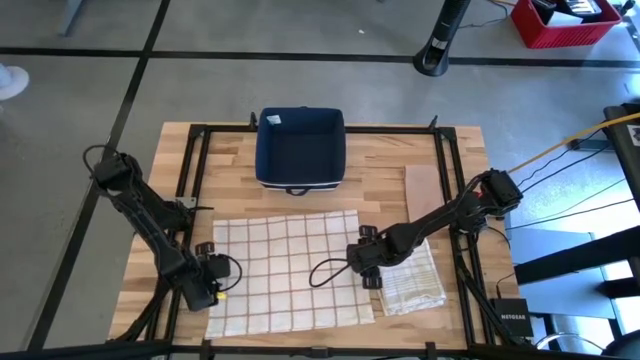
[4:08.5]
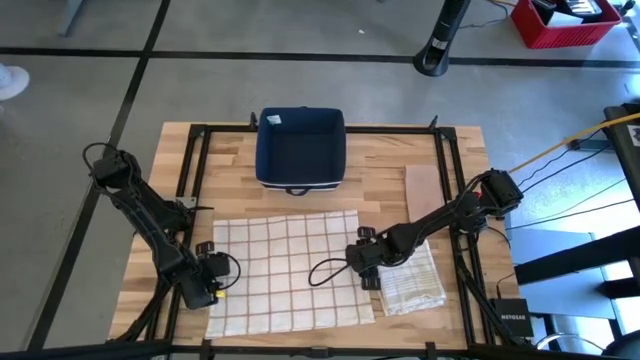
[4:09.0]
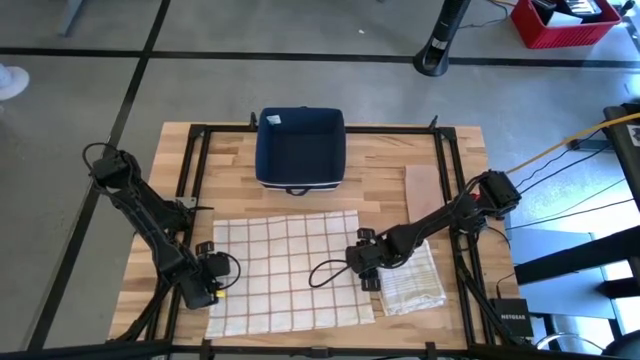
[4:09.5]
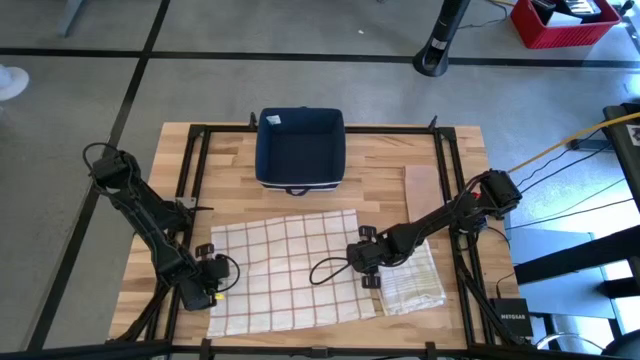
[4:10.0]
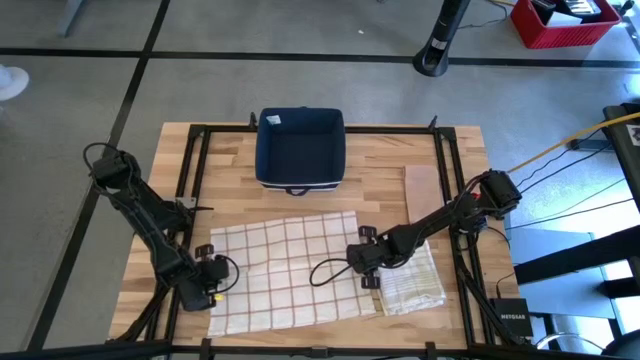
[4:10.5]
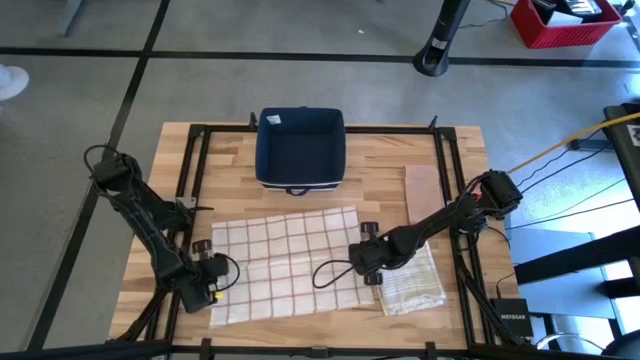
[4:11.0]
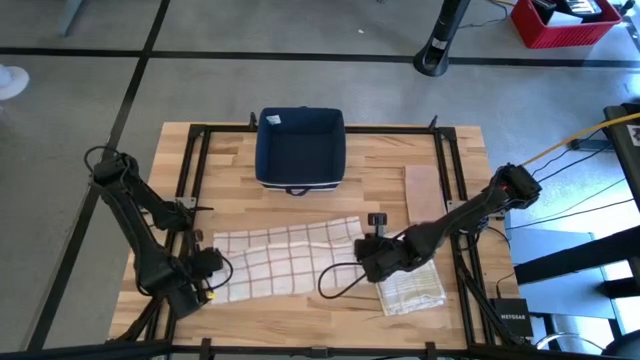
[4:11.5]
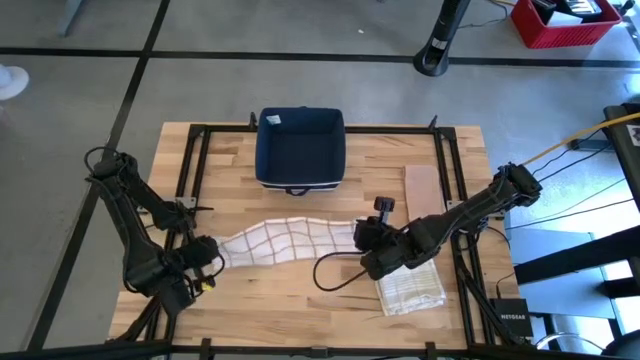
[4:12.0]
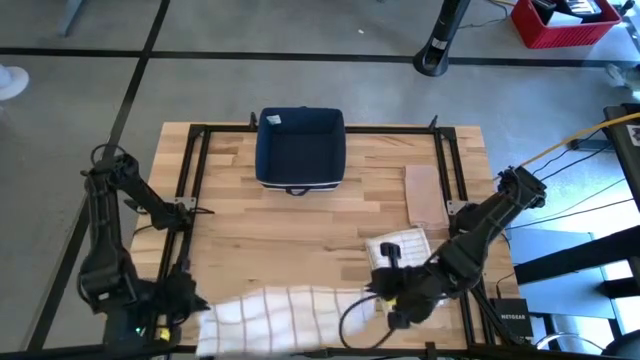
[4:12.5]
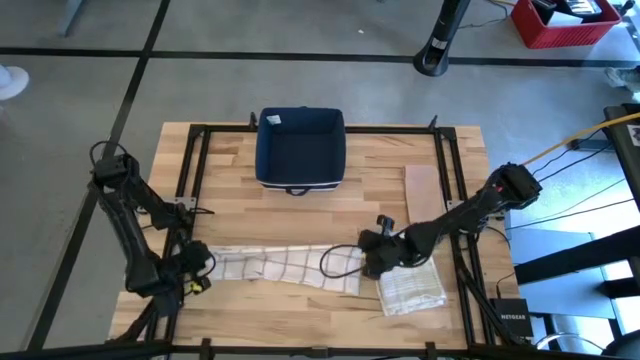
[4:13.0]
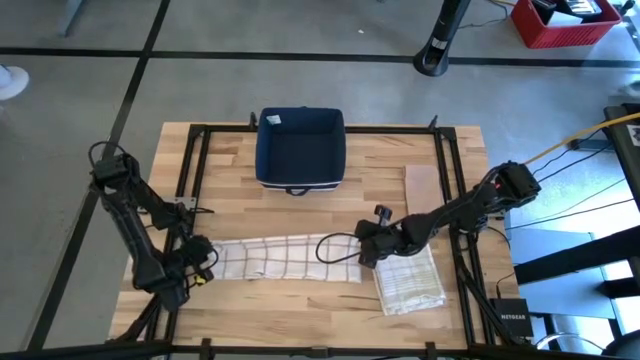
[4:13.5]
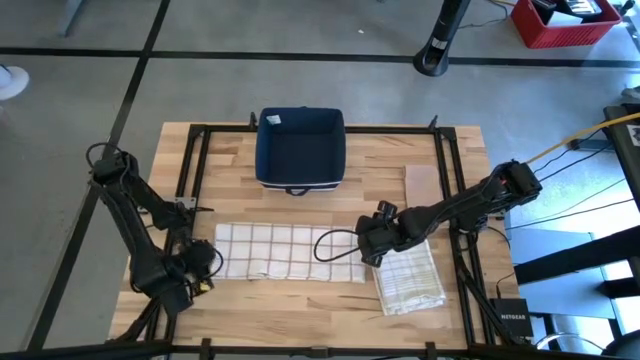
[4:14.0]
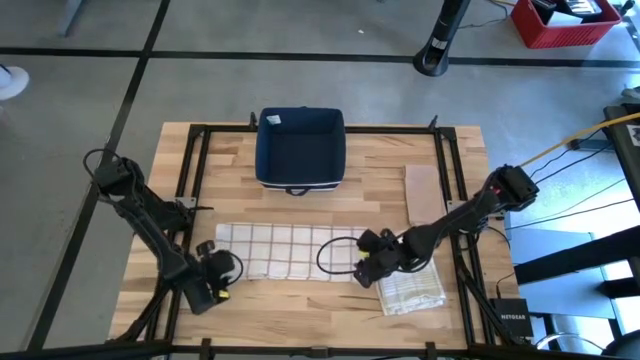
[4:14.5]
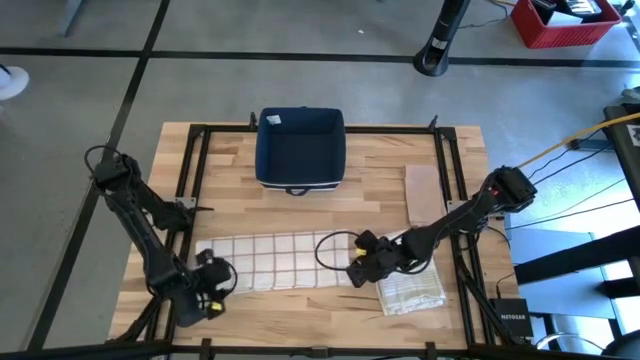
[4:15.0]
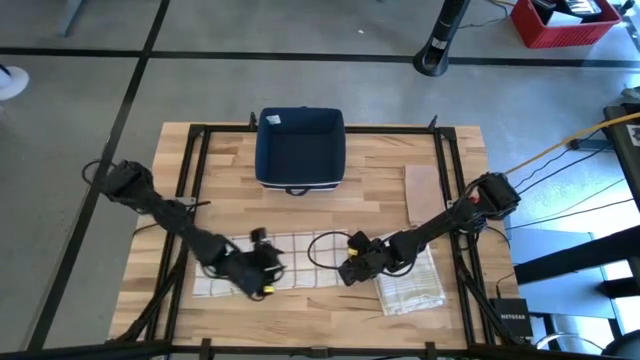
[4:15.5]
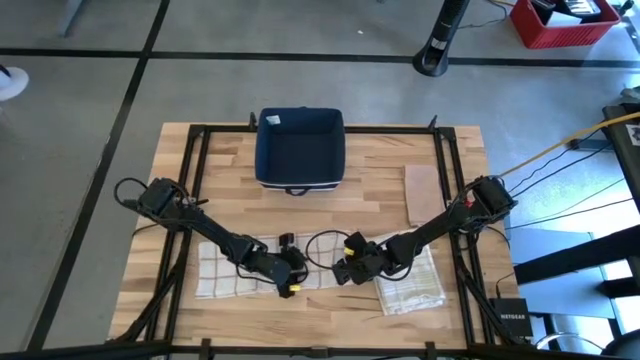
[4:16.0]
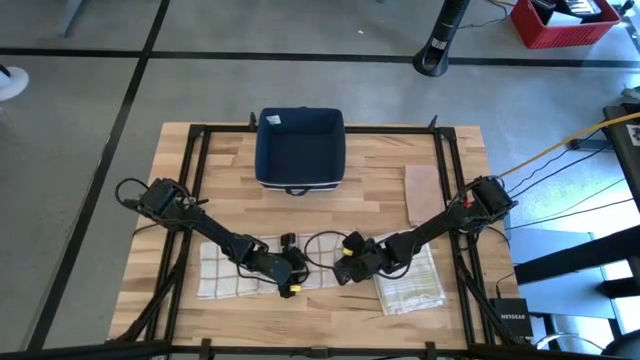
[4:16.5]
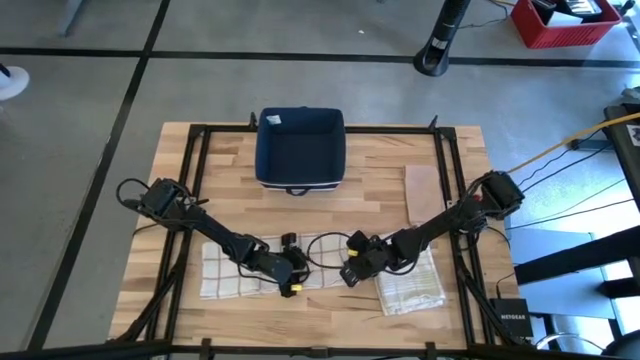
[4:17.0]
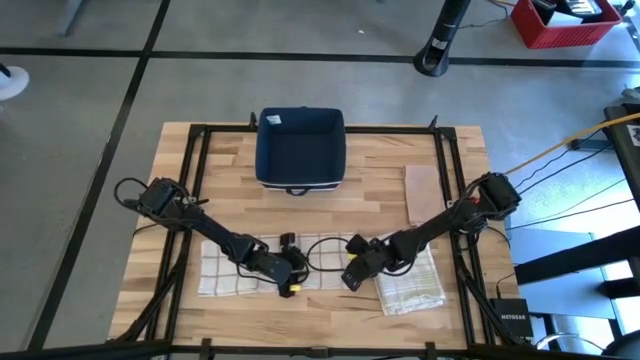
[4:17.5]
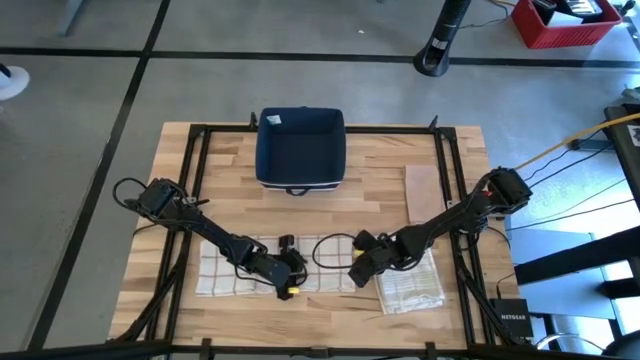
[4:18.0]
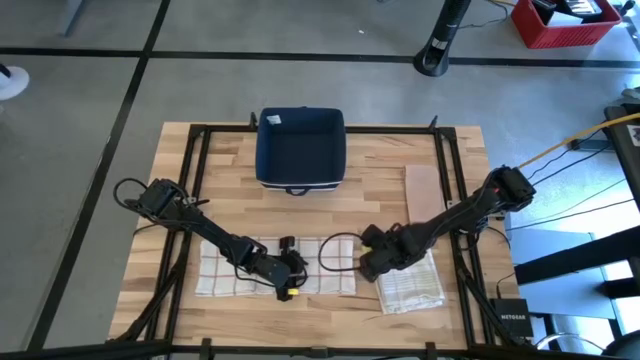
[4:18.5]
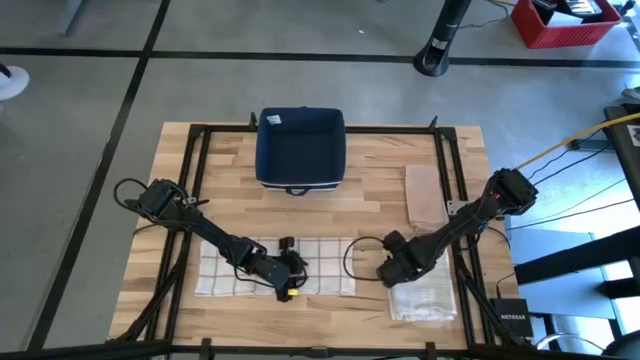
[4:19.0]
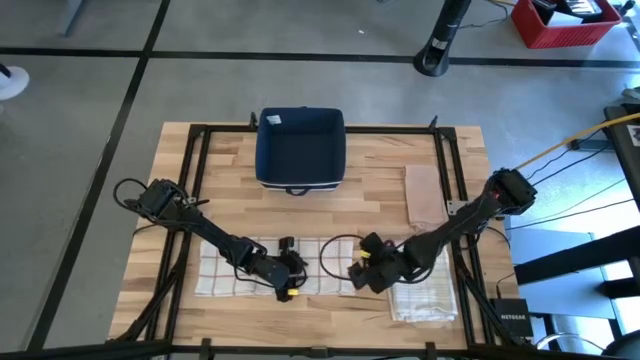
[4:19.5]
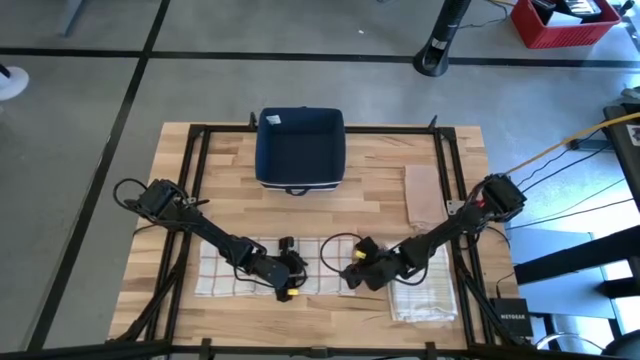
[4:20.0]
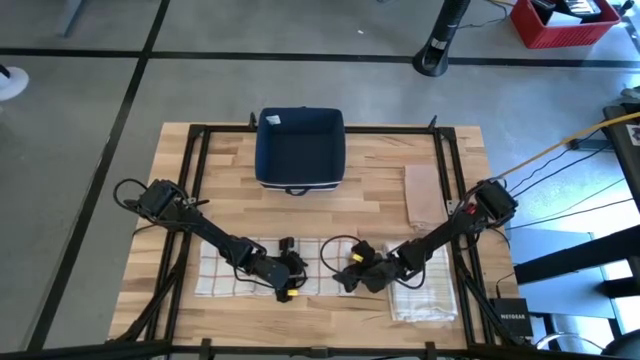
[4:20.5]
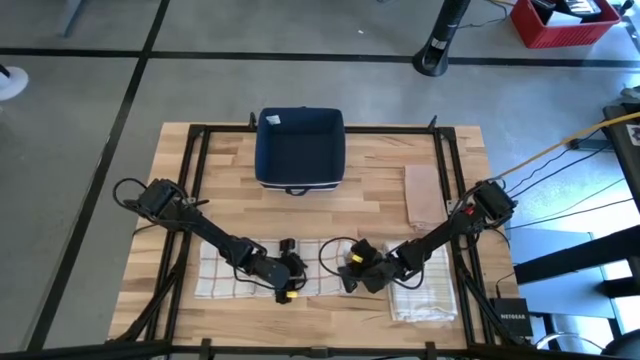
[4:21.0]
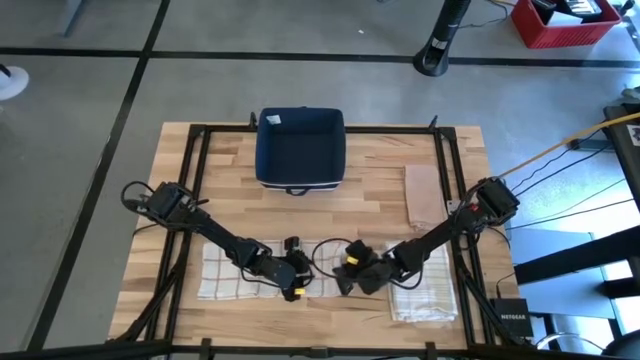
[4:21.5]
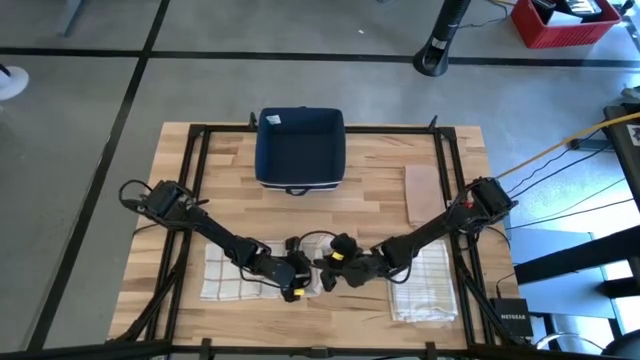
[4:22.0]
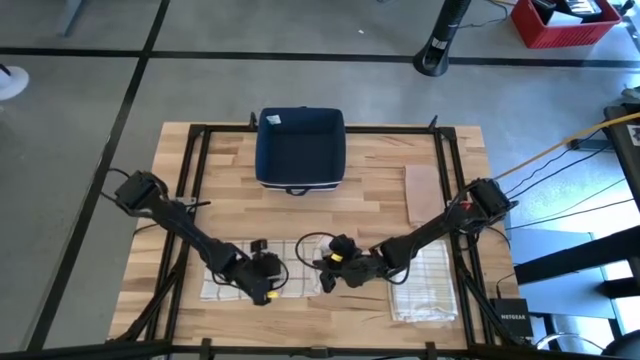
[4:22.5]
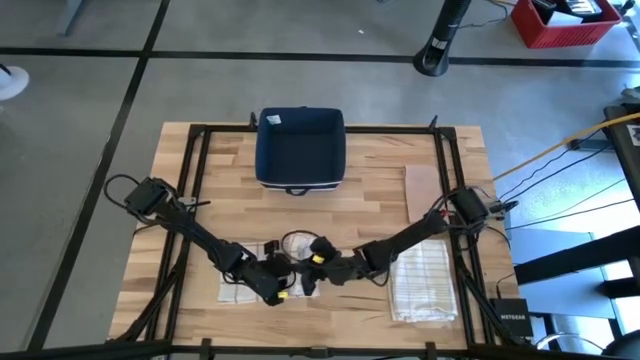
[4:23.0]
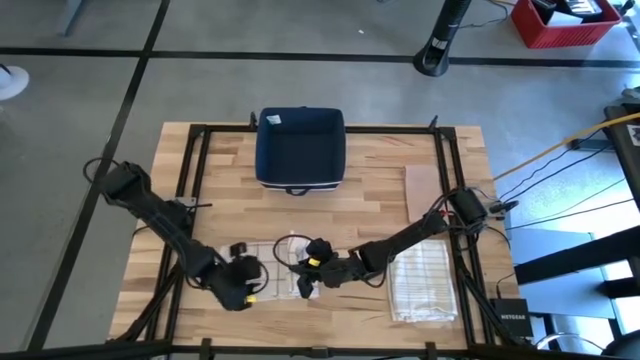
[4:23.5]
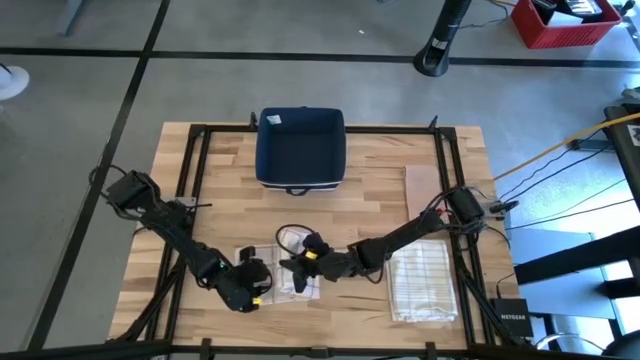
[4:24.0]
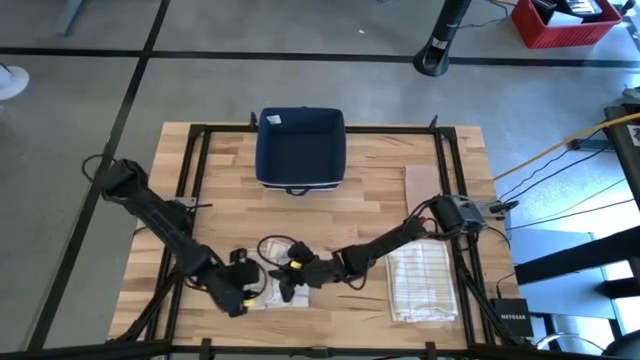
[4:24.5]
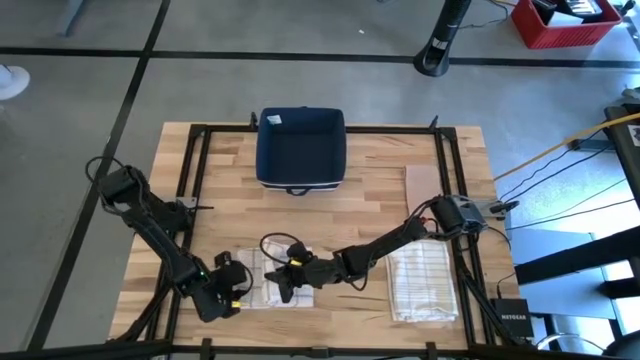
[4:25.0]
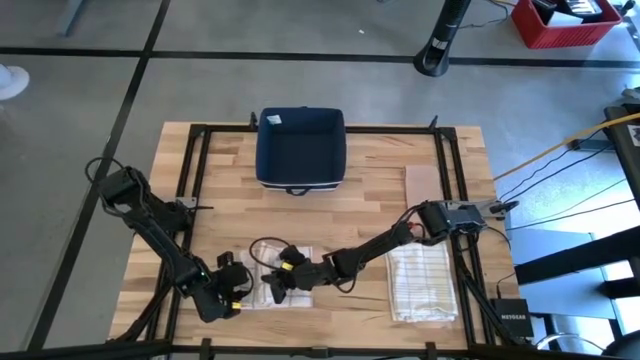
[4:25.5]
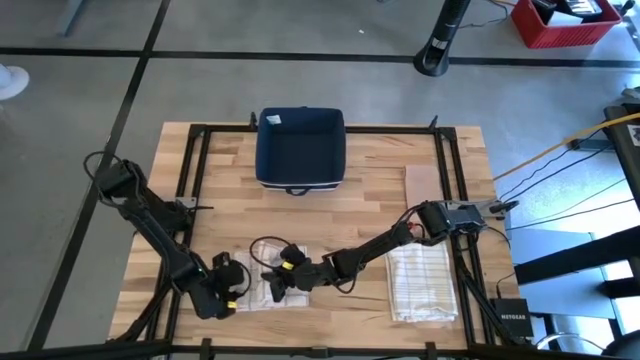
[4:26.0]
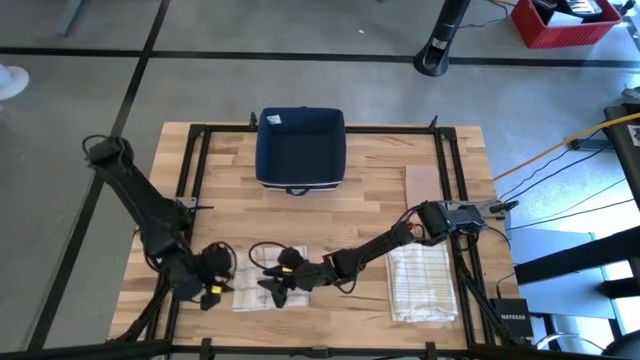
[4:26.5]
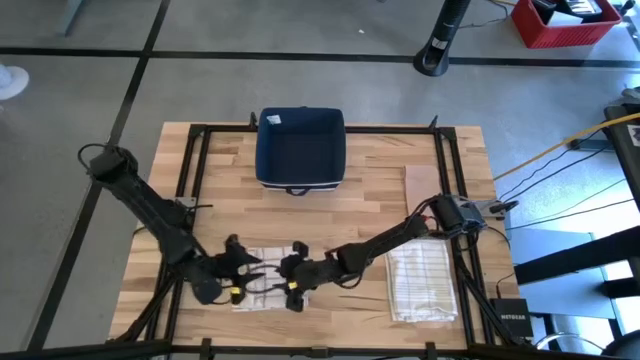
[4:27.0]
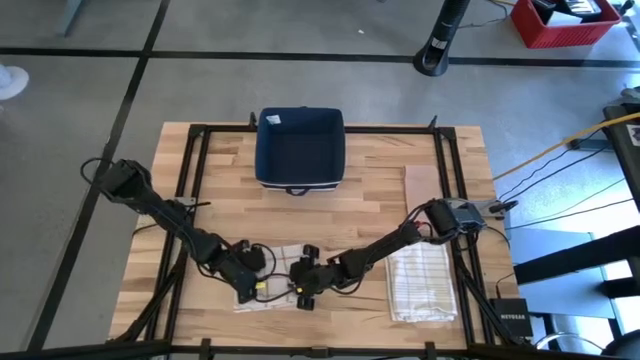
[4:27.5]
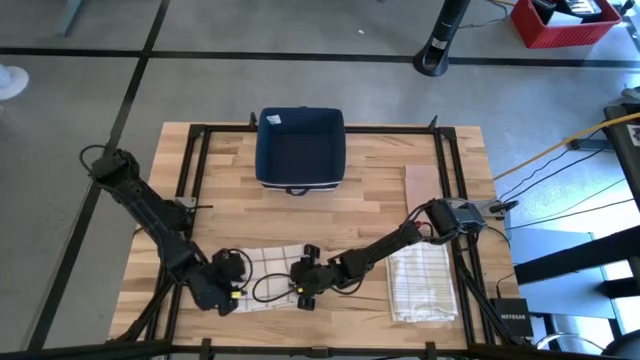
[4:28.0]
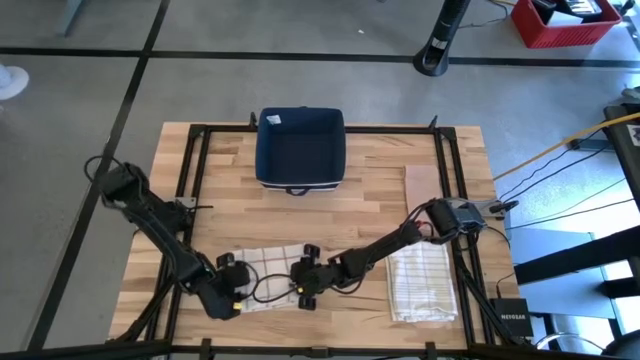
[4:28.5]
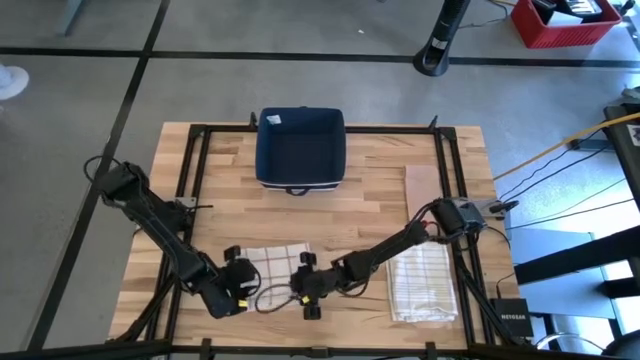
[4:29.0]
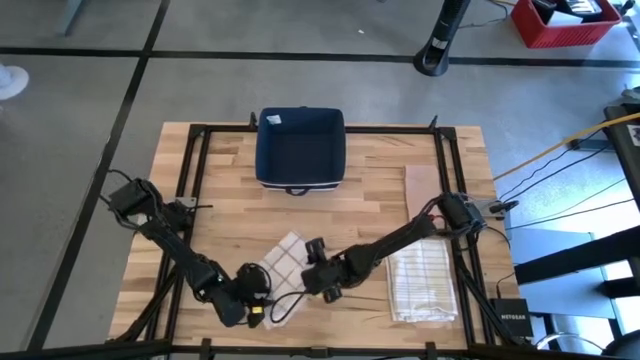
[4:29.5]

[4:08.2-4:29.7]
Task: Fold towel
Fold the white with brown pattern towel on the table
